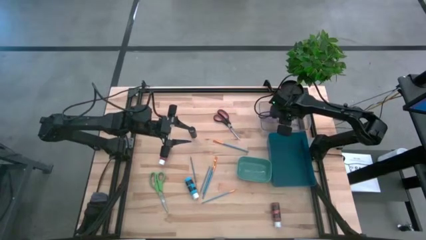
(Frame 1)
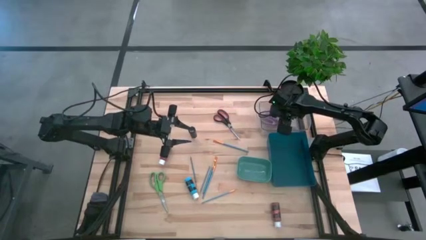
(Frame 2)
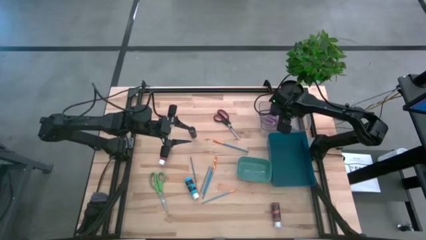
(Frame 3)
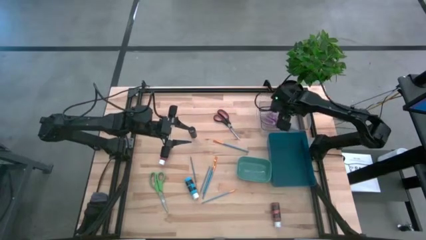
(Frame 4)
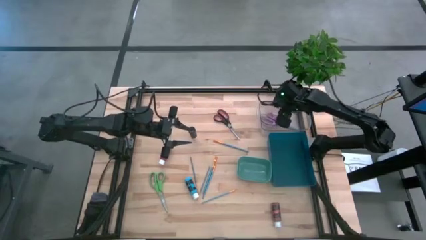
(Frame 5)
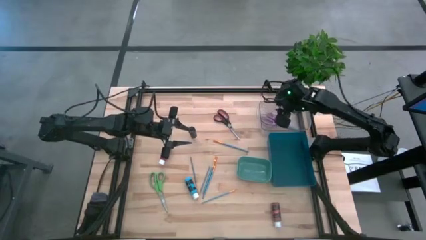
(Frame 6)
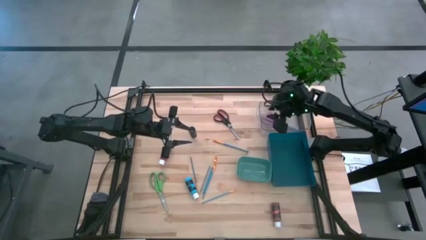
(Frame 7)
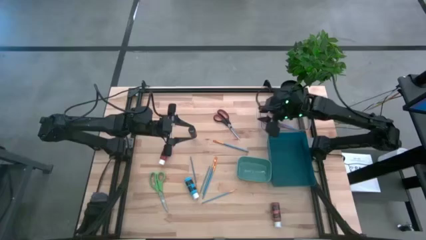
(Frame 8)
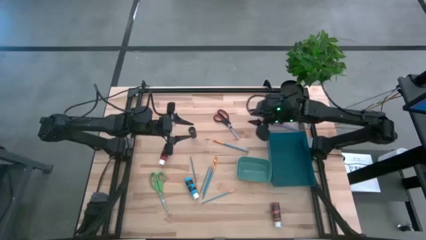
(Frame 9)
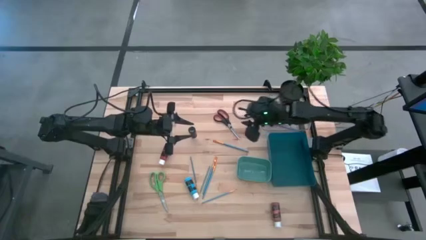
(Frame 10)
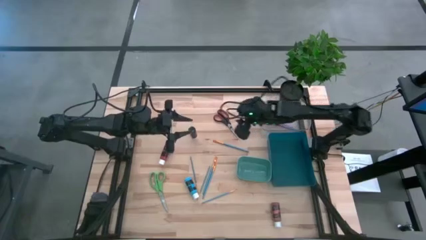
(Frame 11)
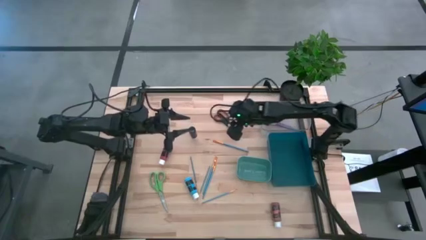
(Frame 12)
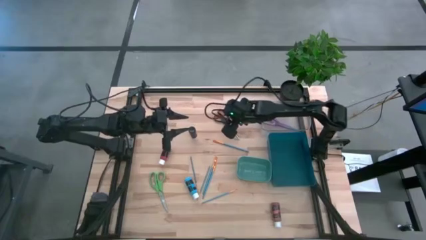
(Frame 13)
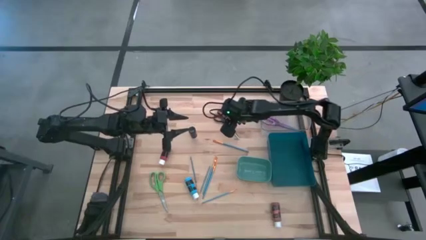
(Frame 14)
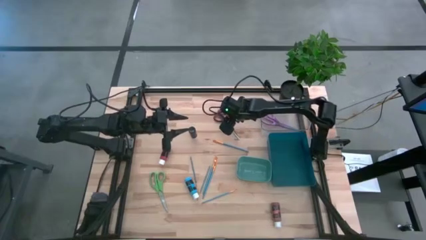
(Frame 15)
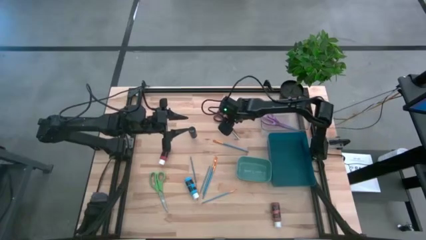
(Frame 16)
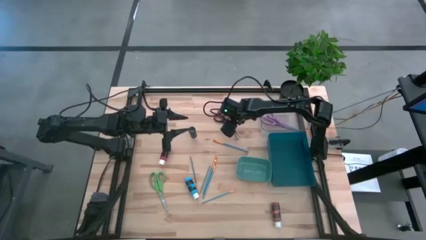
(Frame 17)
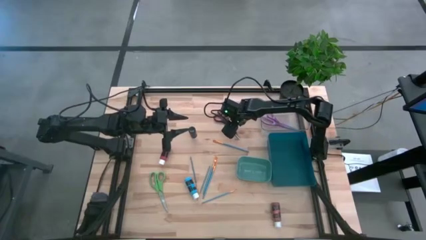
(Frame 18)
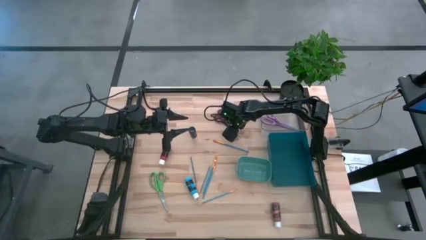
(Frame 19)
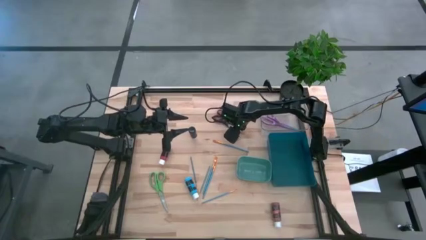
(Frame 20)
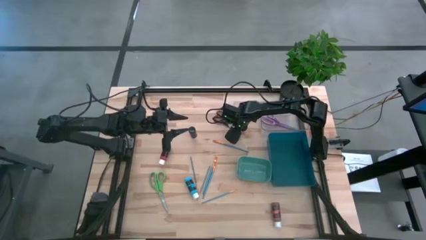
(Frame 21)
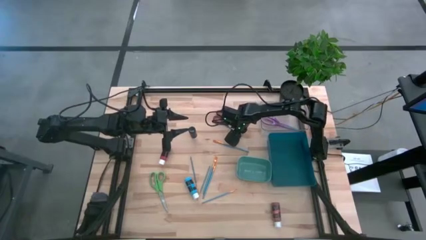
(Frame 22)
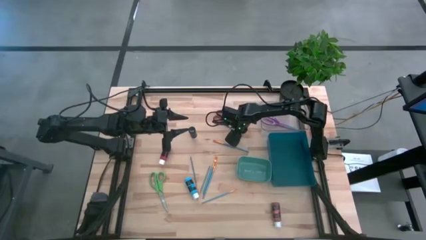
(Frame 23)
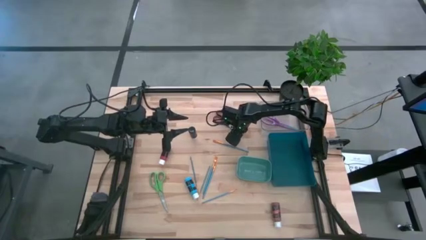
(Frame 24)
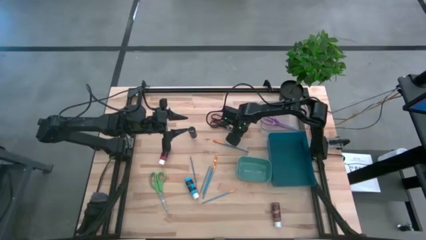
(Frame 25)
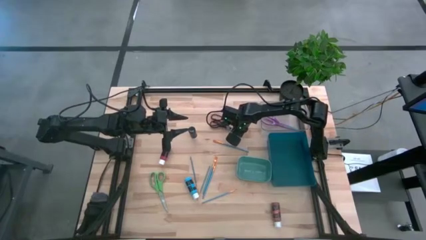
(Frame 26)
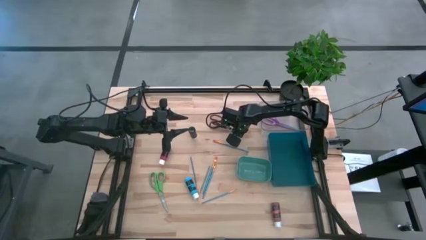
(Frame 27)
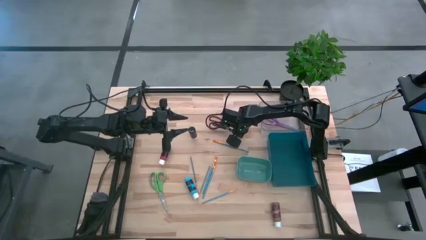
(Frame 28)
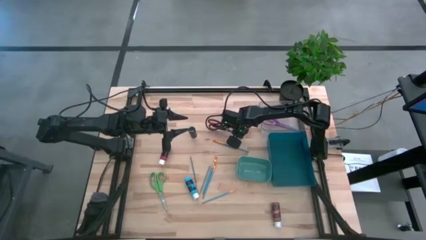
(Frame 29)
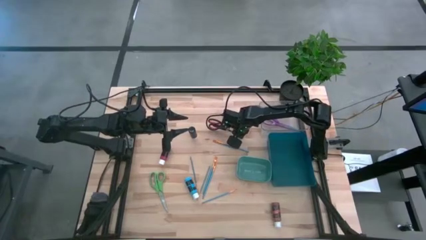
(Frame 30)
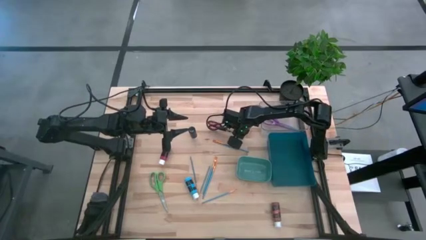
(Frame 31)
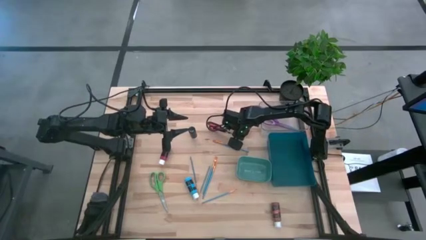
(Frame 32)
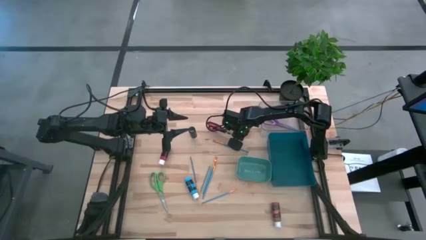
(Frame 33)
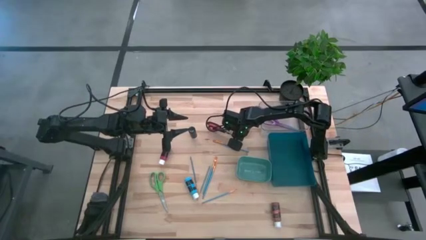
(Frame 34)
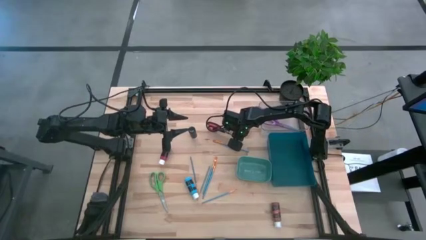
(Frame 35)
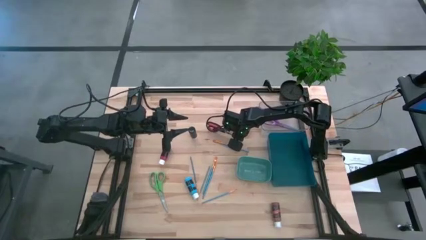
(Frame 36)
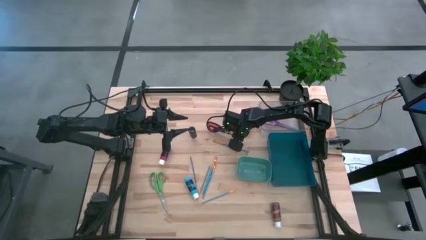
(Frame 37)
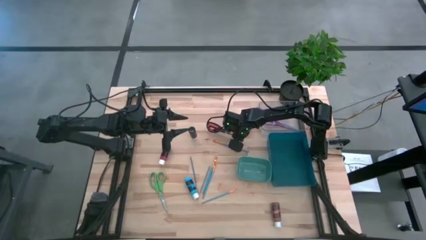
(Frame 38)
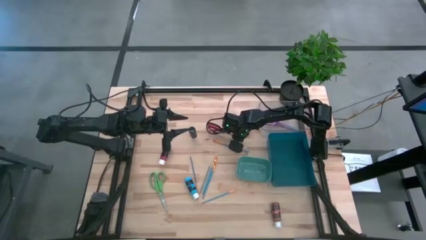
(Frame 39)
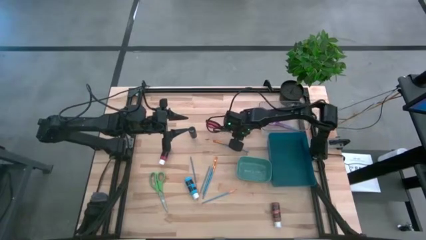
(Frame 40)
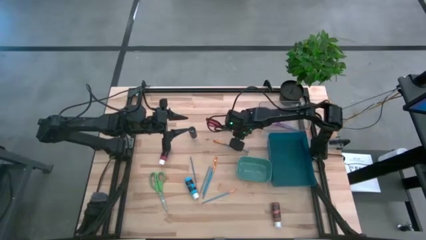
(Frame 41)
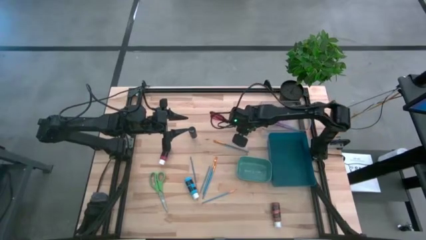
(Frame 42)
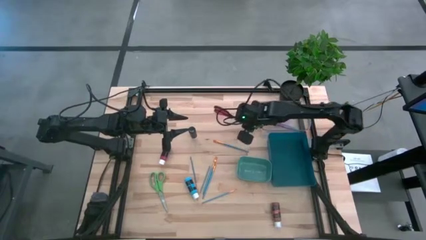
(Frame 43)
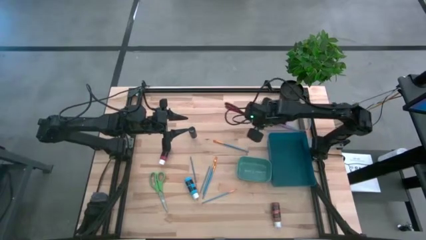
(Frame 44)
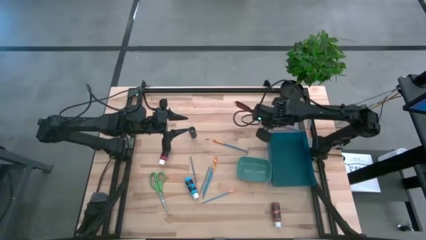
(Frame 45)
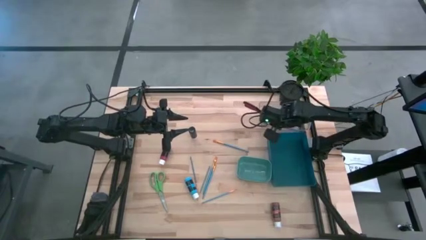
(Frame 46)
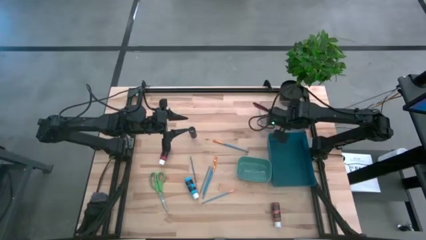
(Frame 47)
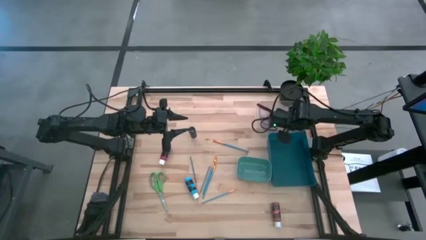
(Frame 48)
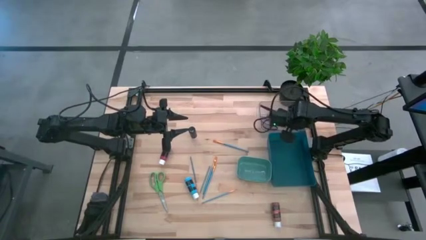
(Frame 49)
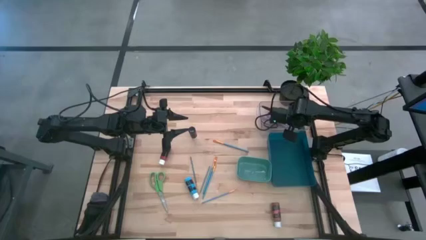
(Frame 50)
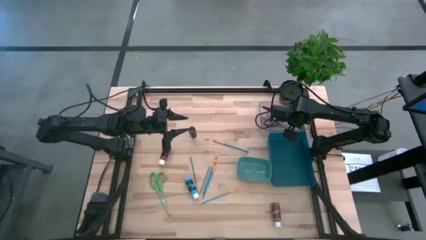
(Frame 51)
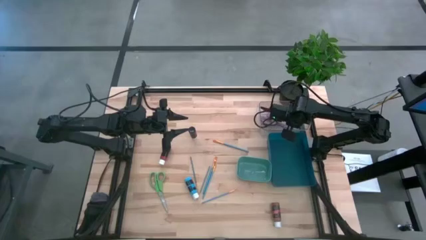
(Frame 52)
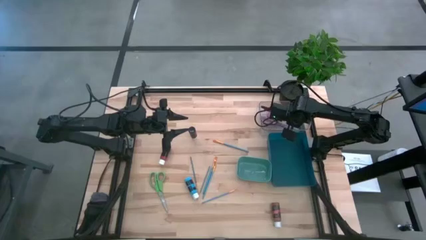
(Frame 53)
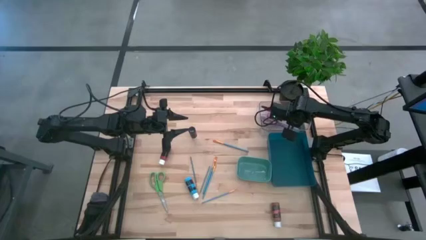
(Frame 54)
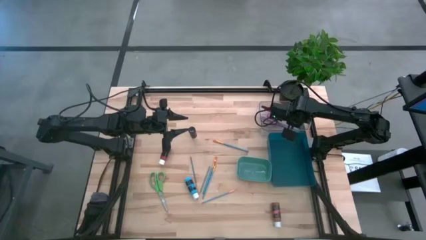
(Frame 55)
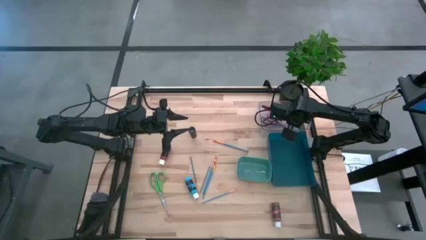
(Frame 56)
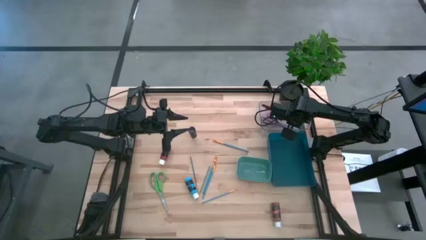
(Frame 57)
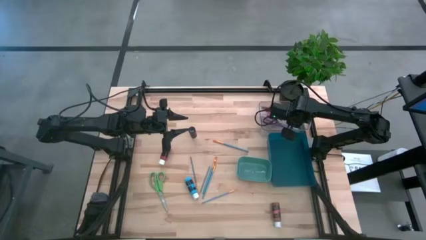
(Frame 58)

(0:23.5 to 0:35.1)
Task: Pick & Place Paint Supplies
Put the black scissors into the transparent bin

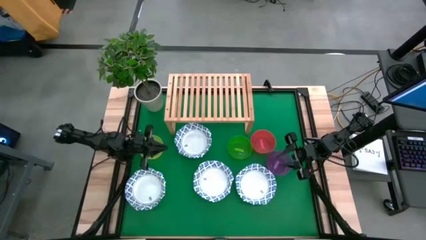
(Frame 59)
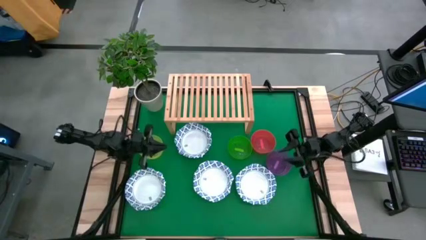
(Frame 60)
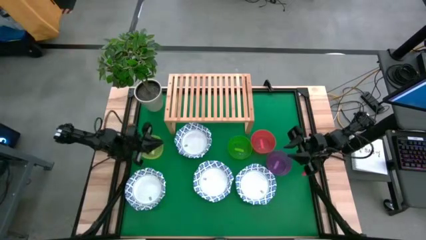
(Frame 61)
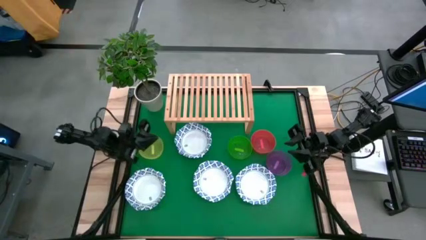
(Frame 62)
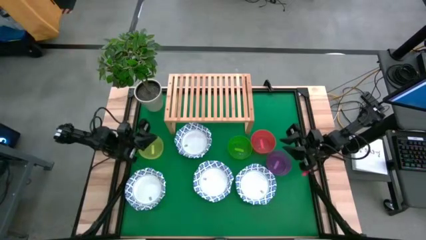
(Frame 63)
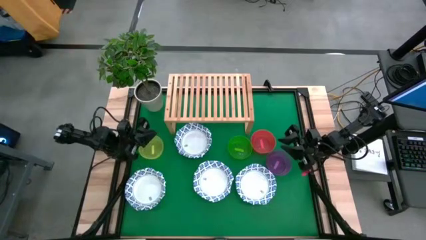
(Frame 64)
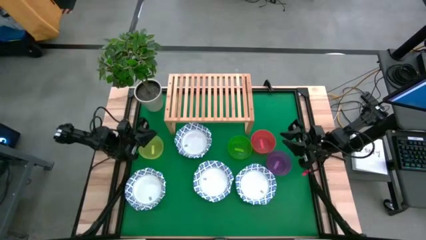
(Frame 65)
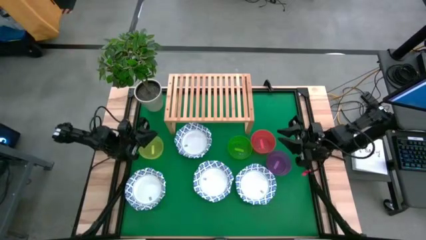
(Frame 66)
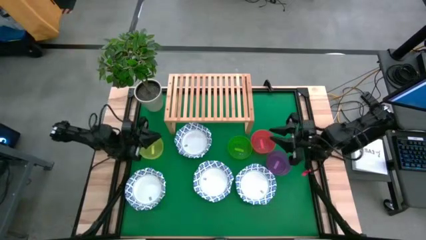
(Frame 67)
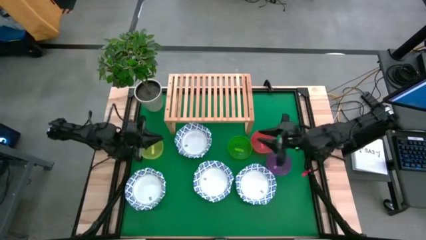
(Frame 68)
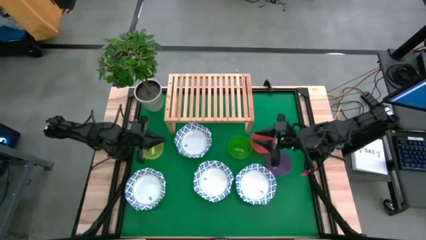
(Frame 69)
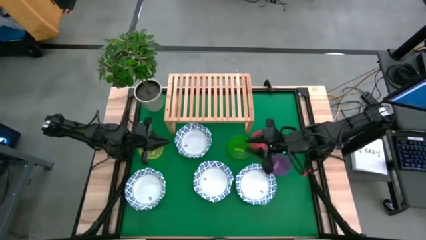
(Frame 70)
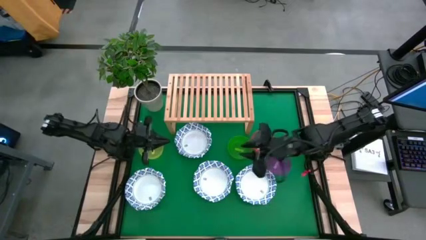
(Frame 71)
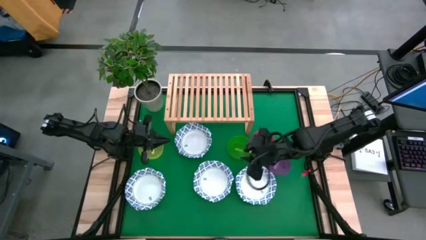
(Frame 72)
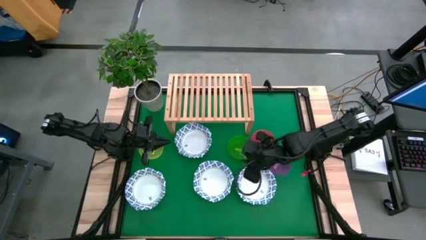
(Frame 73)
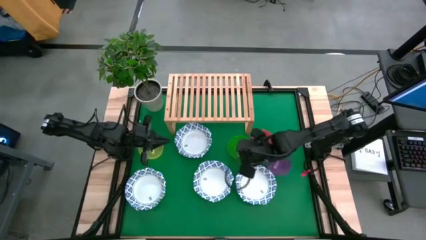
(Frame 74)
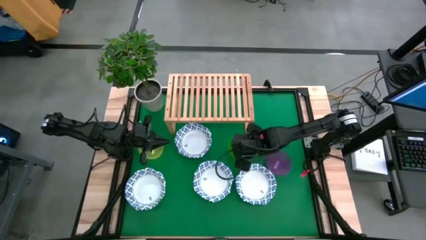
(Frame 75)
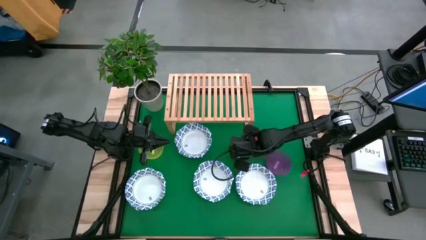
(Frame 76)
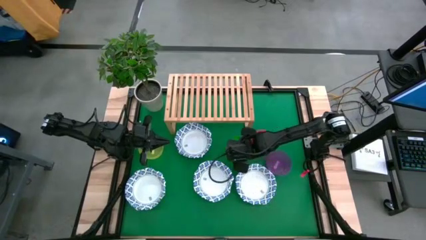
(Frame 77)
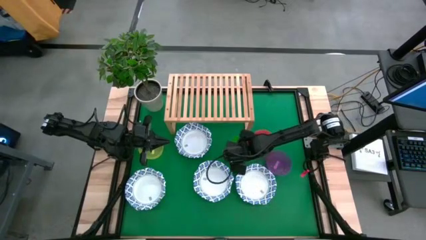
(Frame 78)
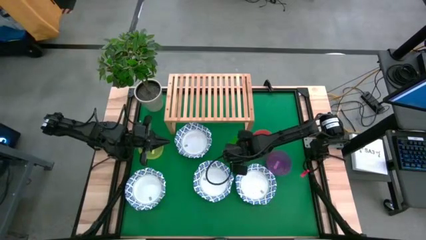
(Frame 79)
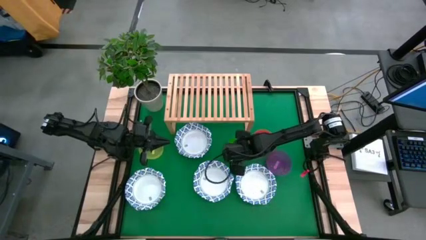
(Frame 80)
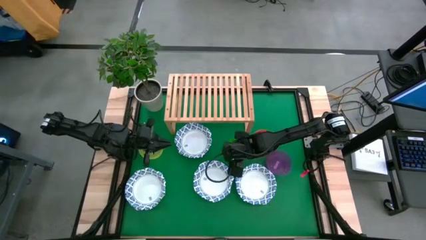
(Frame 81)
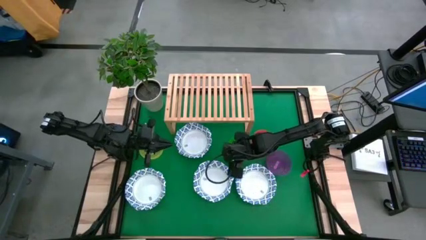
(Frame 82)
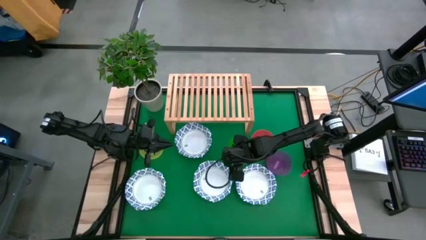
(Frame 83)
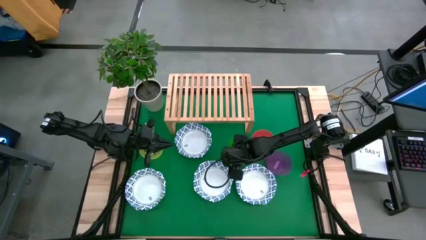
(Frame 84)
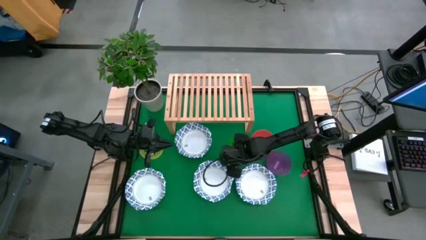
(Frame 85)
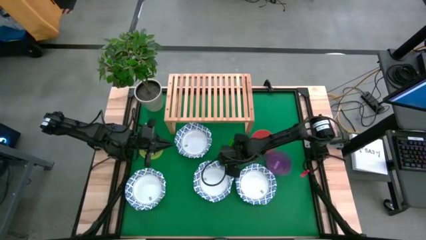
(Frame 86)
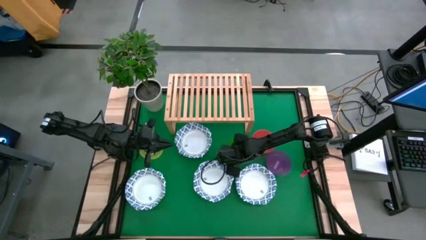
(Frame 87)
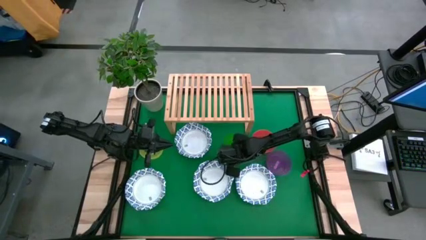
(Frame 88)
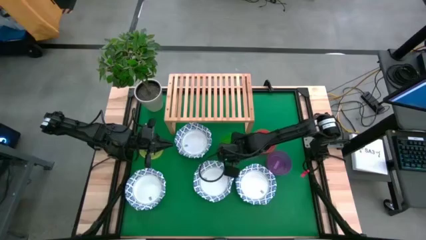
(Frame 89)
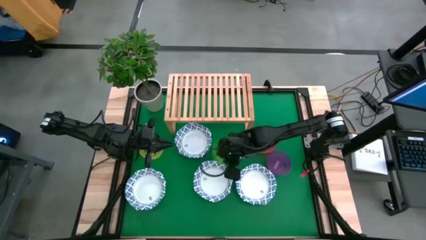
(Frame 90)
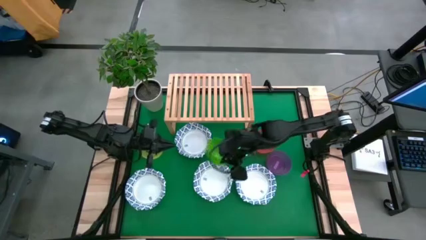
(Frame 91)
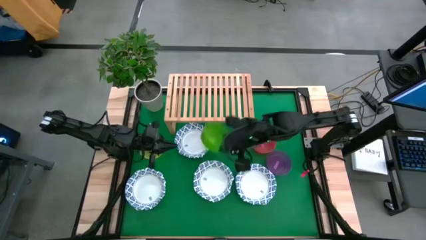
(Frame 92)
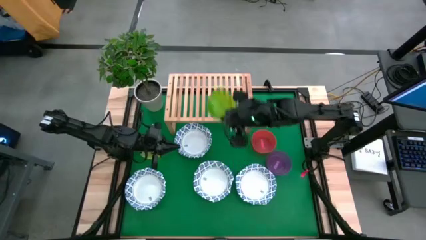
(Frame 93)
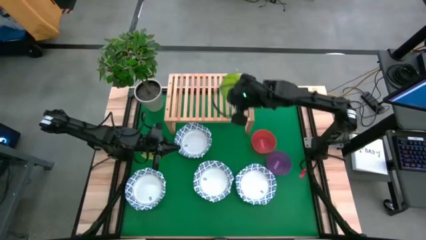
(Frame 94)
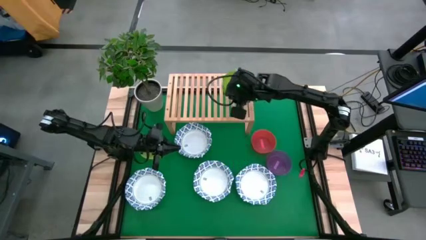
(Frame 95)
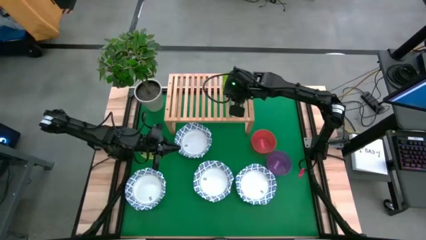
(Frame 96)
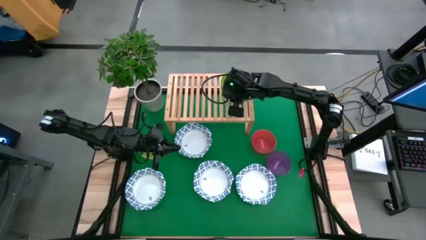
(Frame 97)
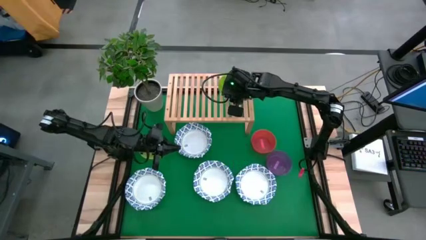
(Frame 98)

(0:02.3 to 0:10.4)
Task: Place and stack bowls onto a shelf
Put the green bowl on the shelf
